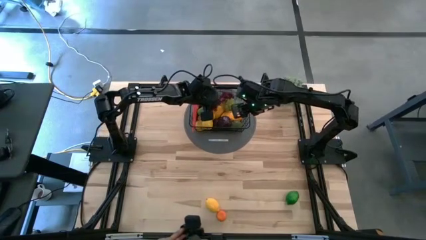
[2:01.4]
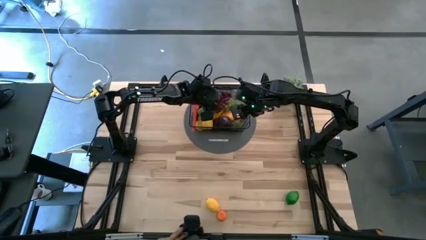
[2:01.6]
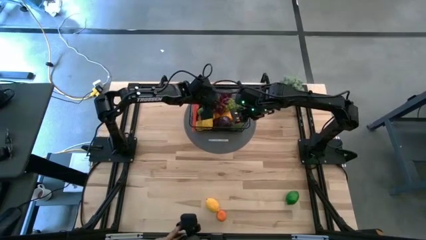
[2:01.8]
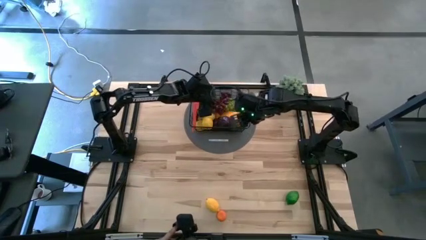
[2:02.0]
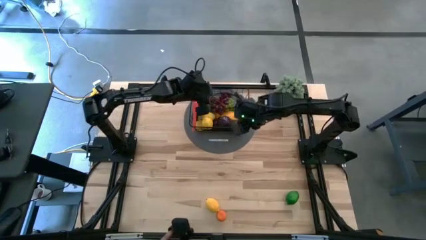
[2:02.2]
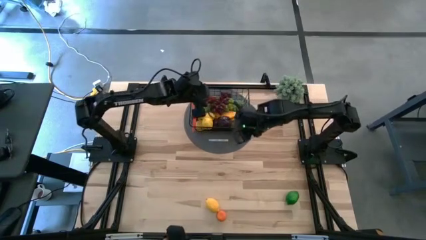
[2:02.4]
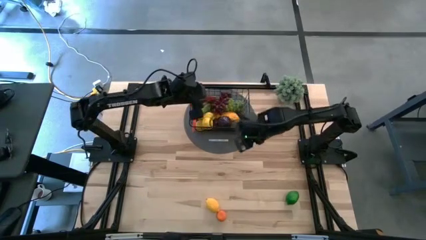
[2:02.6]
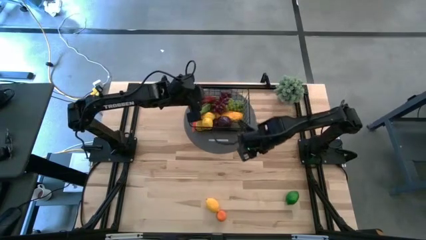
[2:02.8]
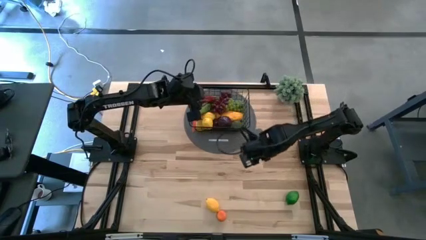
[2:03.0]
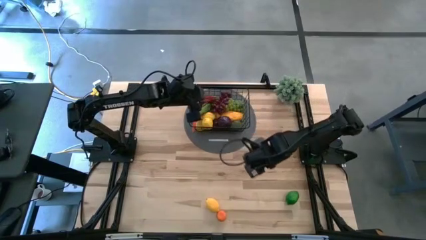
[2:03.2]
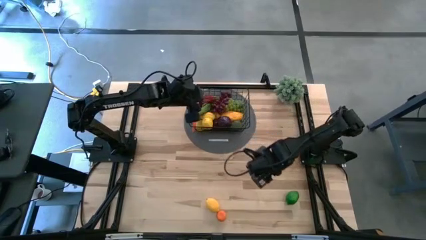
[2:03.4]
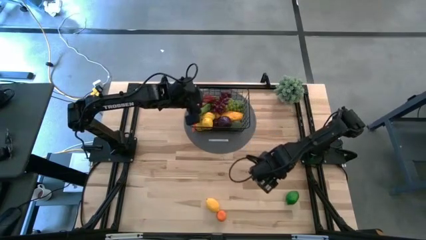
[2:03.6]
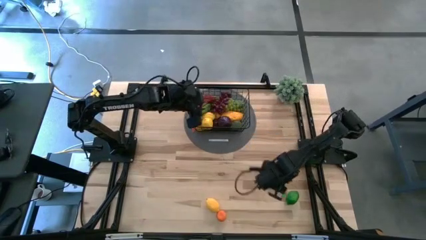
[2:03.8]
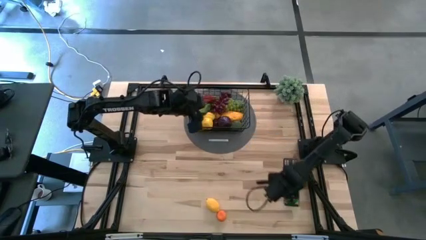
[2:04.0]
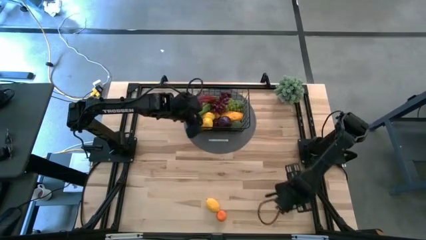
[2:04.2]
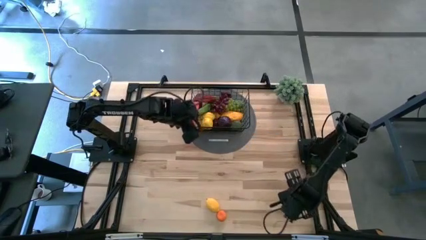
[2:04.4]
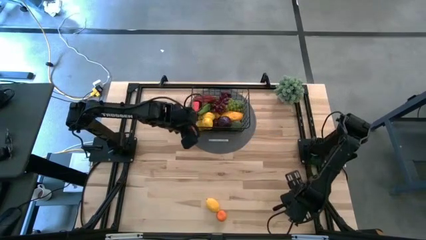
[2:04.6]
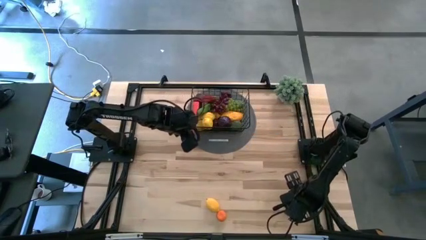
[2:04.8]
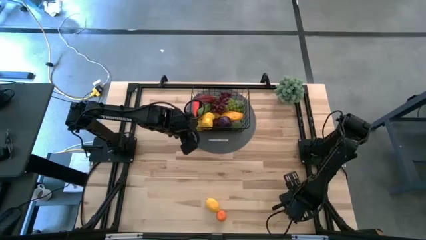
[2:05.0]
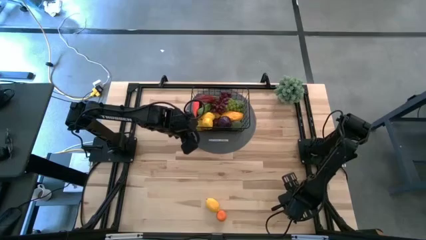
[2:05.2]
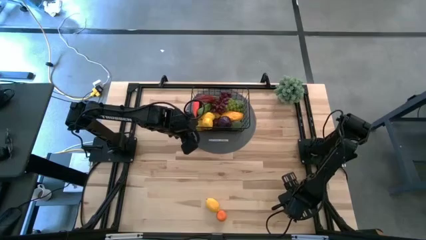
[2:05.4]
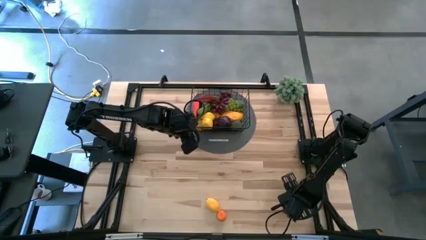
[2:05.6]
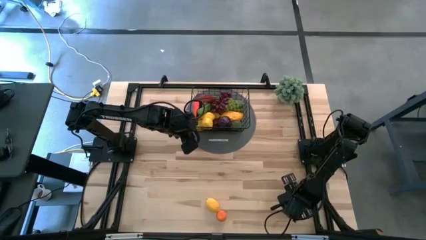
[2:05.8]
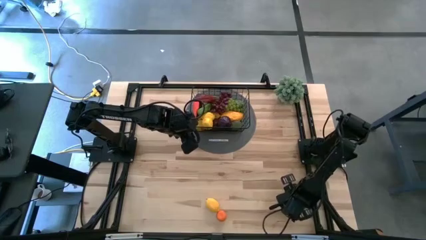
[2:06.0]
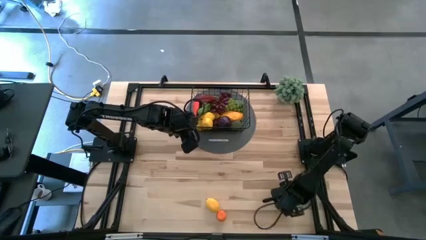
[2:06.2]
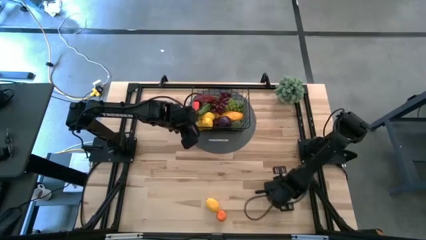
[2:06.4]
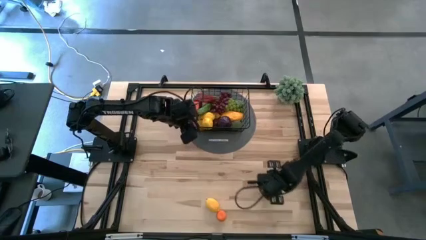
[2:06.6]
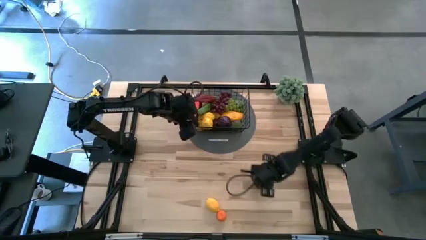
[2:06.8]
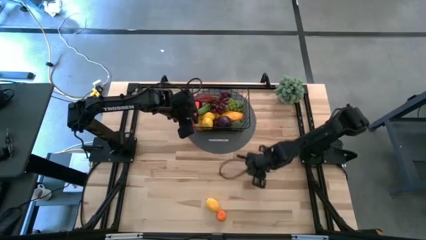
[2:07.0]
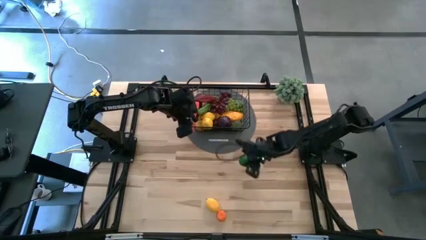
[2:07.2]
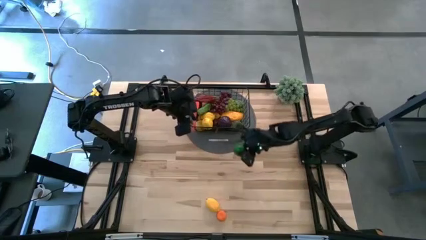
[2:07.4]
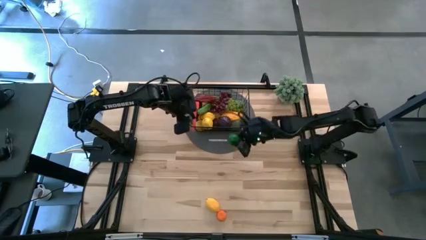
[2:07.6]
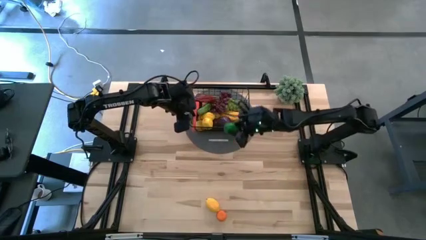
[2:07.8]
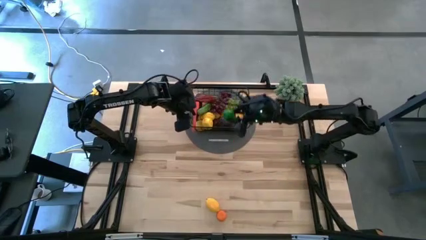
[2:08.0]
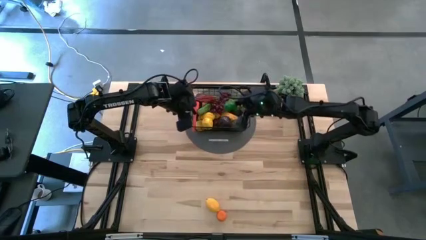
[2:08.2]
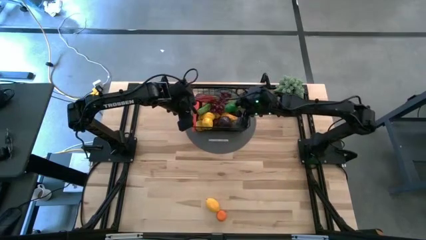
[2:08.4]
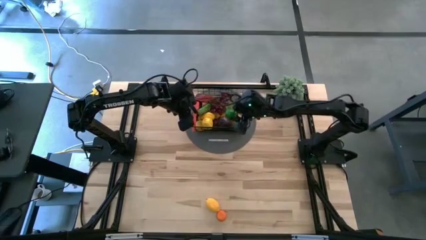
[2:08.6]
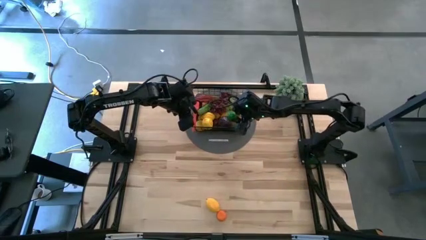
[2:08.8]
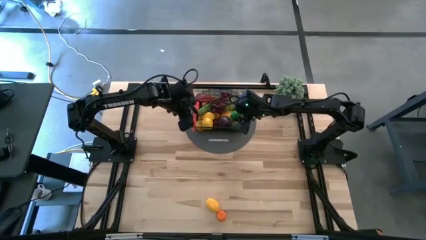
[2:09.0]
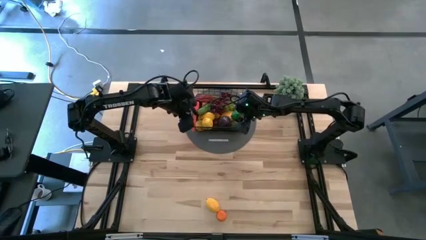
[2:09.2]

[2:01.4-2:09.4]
Task: Build produce basket
Put the green lime into the black wire basket

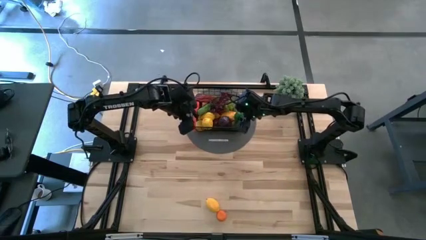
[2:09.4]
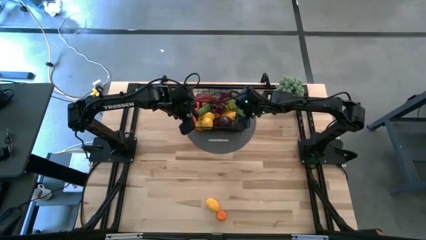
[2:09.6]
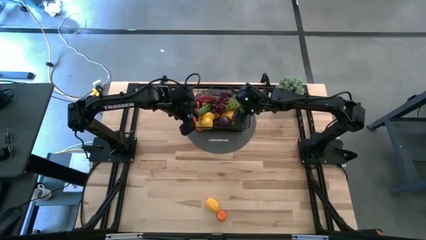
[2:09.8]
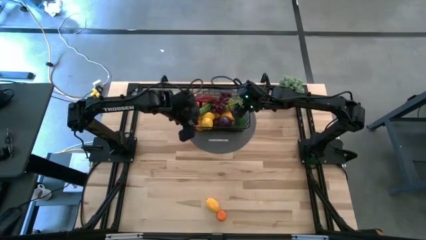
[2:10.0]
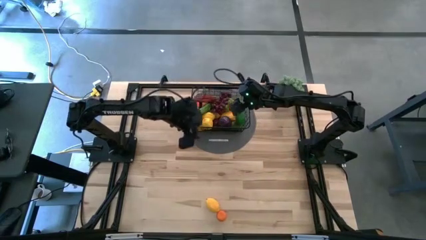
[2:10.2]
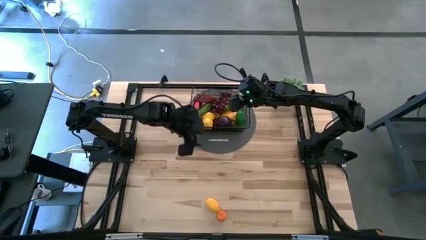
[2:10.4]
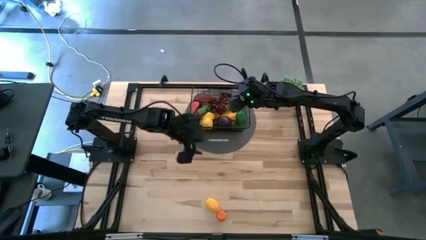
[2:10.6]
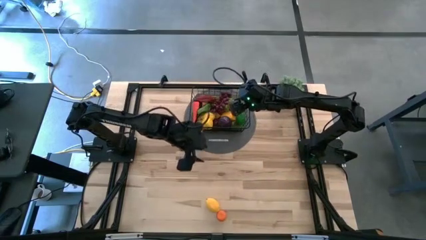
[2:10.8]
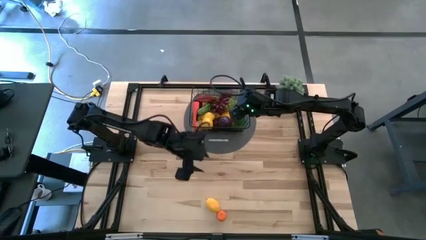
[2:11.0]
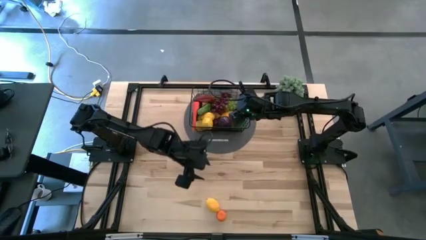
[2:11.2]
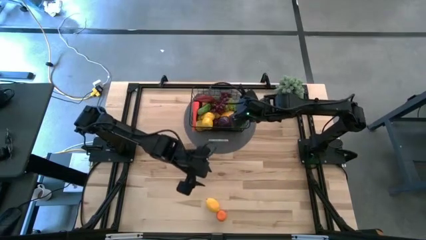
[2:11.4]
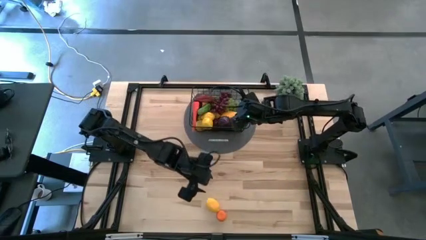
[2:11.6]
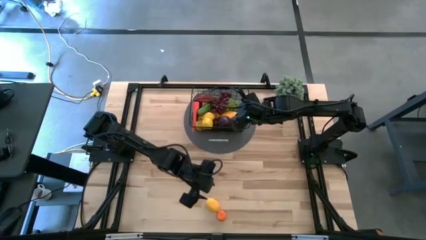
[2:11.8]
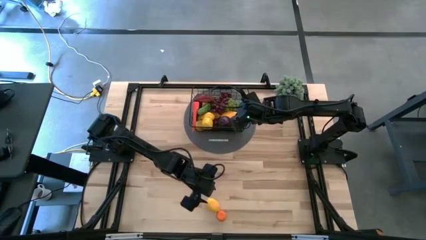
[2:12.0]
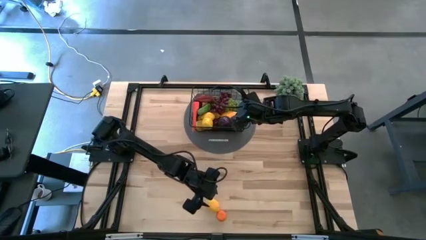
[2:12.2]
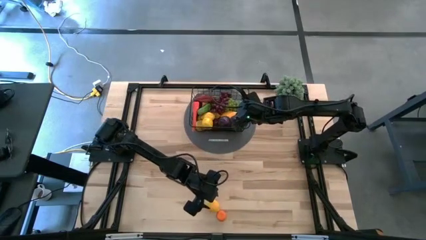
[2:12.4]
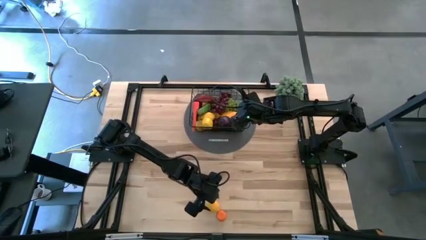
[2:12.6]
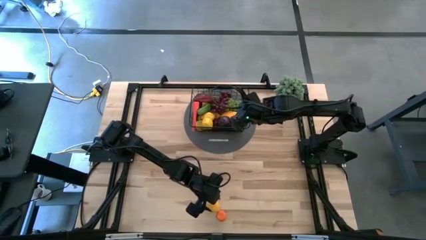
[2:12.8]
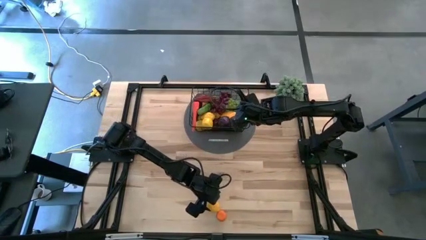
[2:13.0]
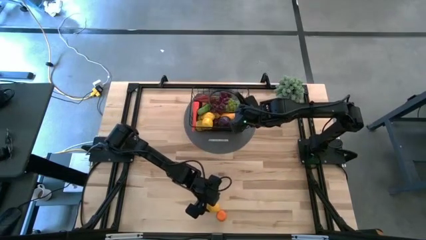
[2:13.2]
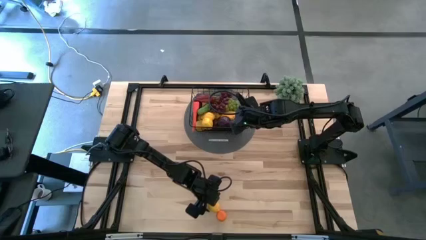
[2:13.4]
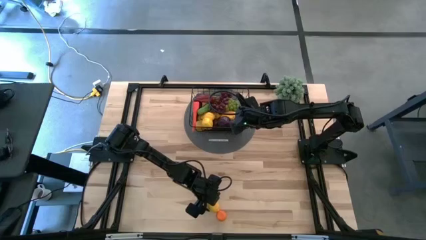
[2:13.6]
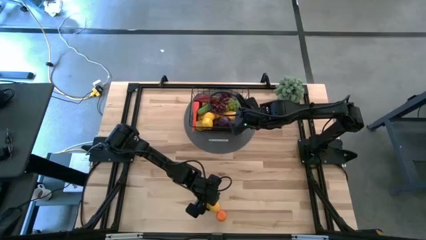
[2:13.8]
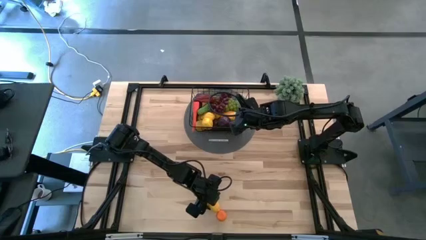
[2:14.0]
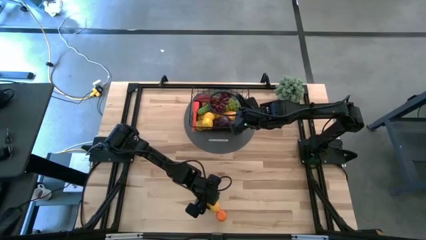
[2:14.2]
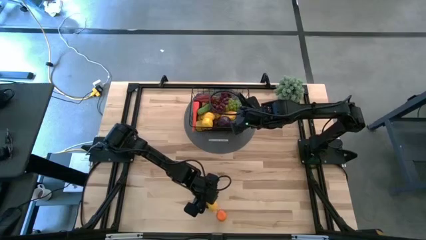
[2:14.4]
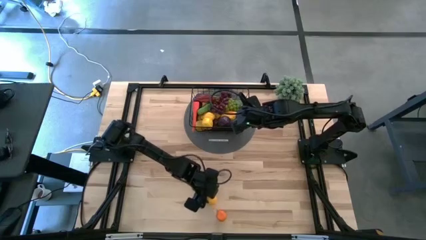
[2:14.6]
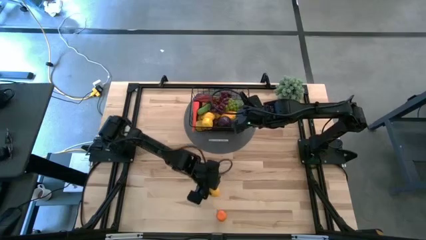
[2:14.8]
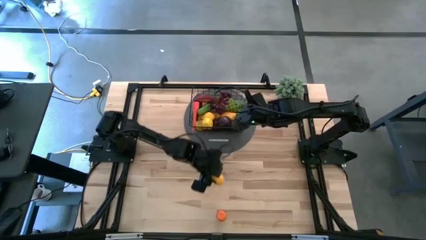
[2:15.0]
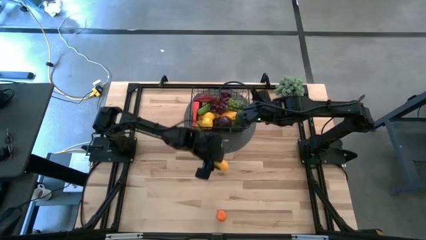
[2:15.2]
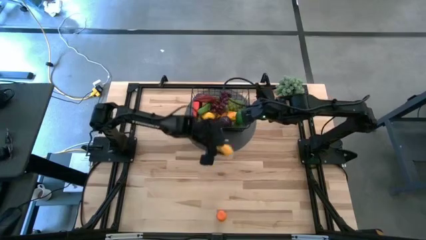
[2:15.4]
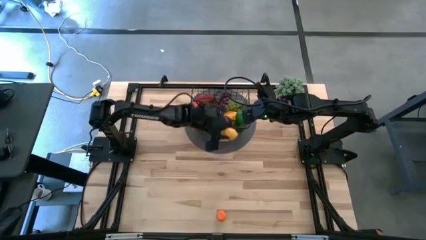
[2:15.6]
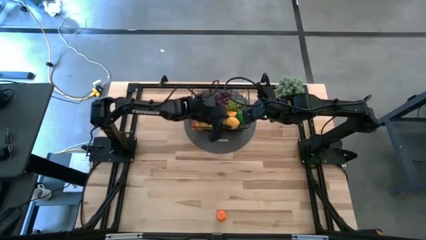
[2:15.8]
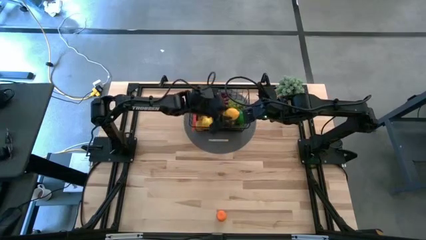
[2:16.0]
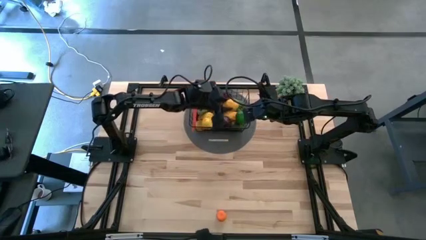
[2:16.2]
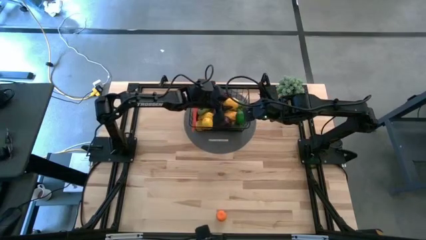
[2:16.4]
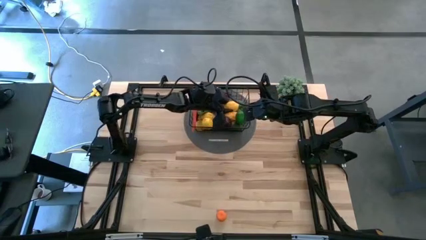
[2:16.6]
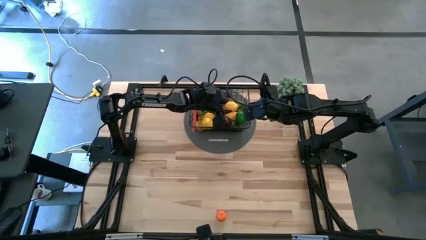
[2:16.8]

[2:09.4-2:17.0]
Put the yellow lemon into the black wire basket

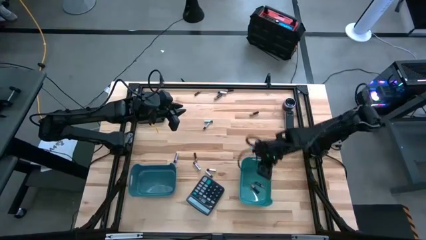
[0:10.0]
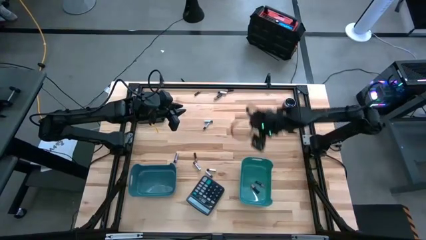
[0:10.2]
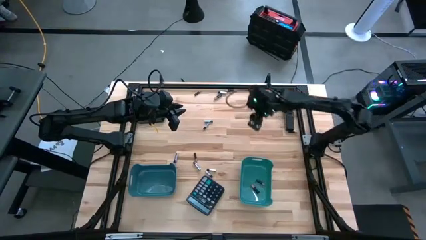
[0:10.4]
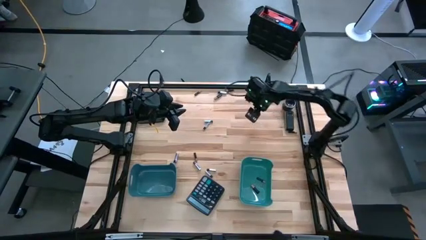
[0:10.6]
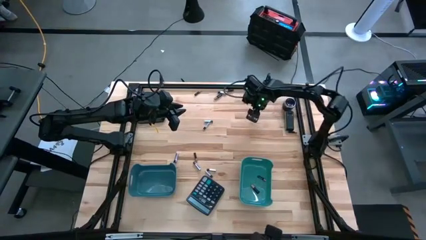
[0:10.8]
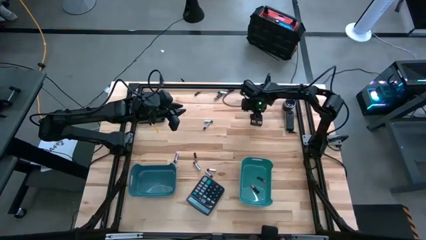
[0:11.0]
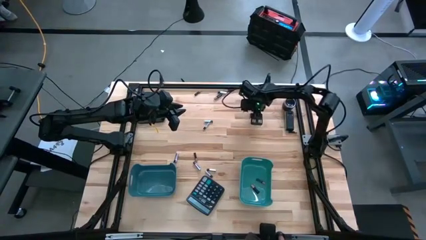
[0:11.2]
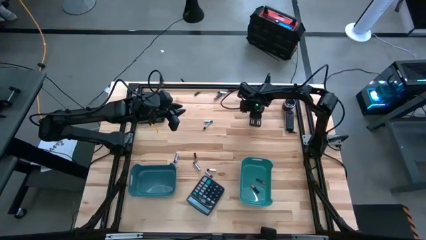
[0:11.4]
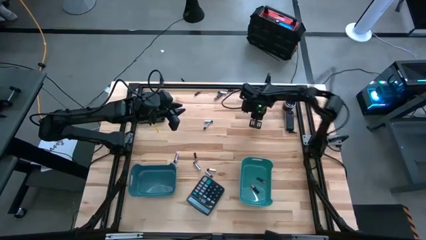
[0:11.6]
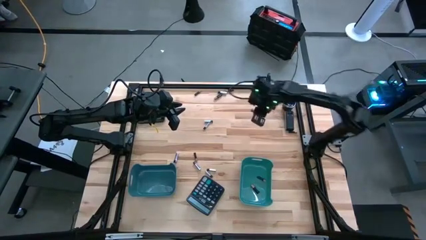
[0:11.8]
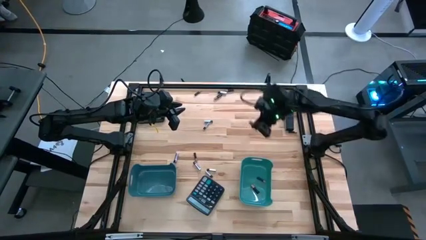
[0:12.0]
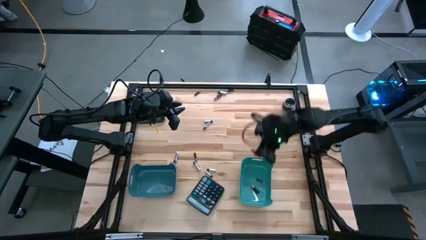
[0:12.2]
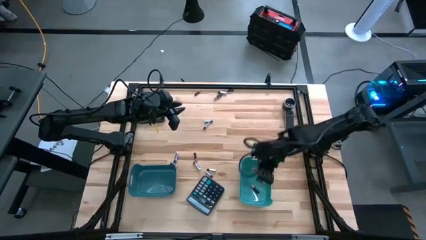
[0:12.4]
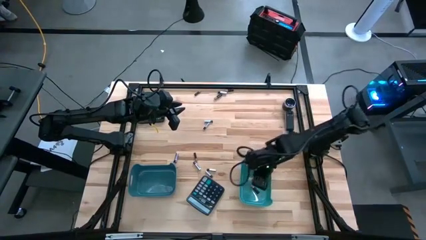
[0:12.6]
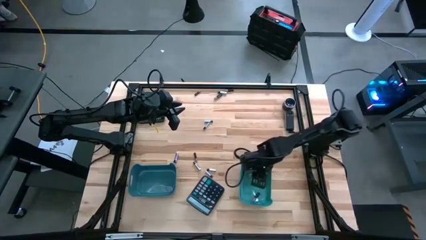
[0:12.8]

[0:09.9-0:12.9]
Task: Sort batteries
Put the black battery into the dark green bin
